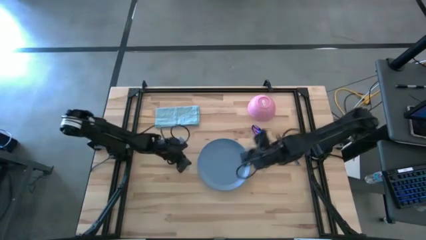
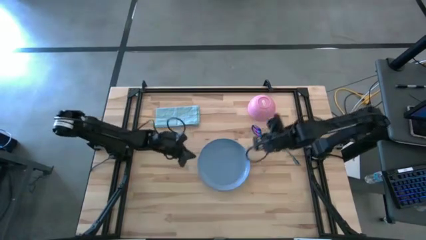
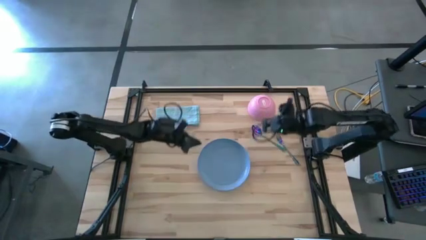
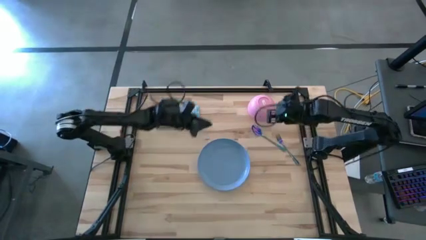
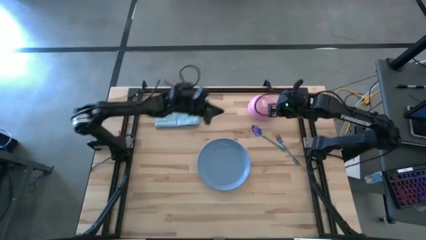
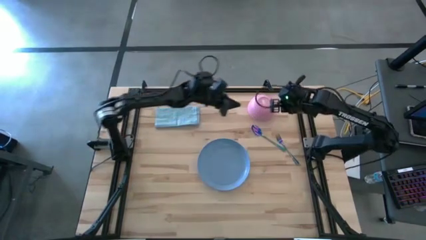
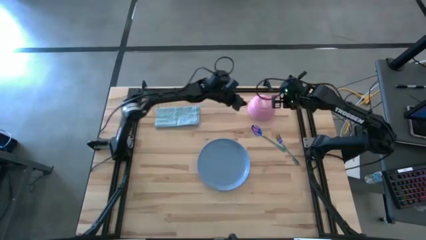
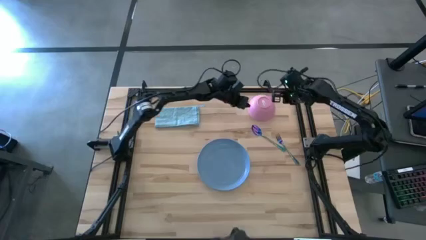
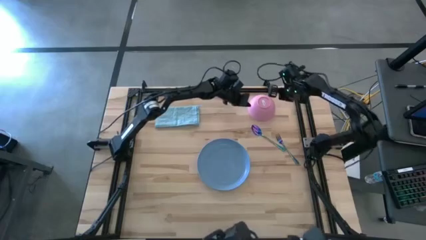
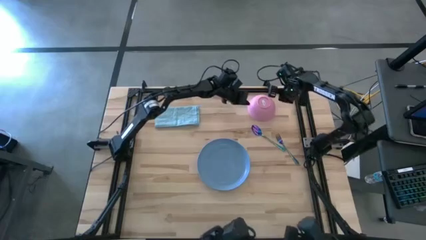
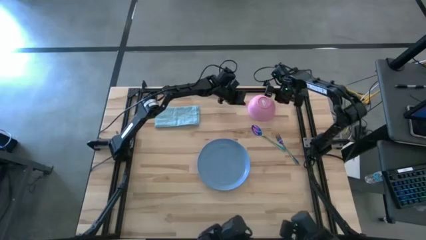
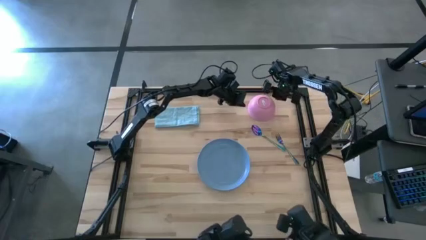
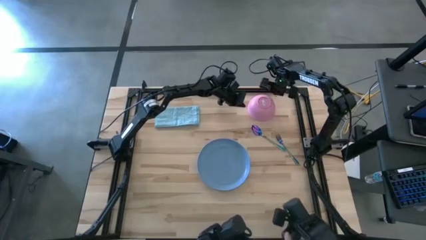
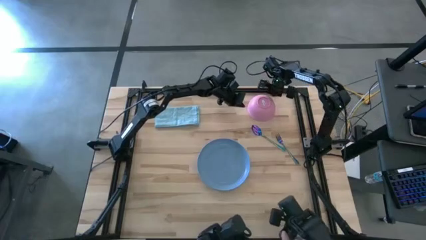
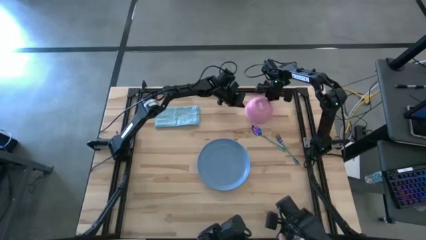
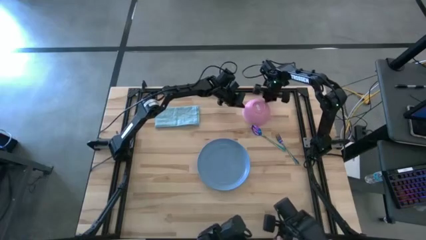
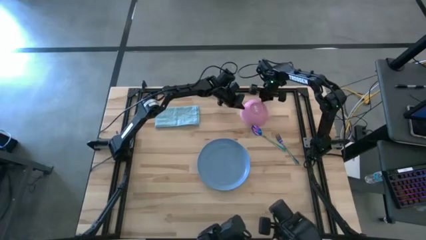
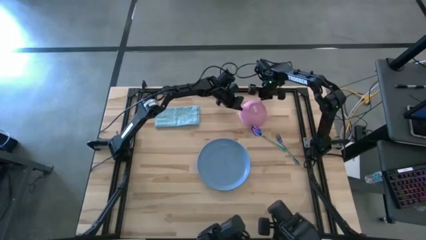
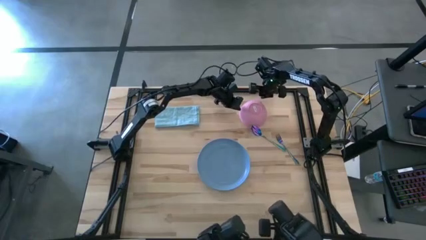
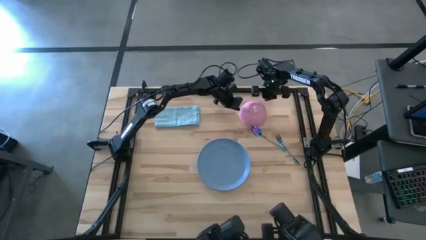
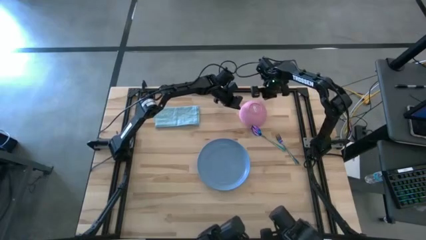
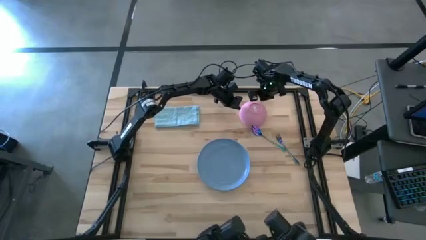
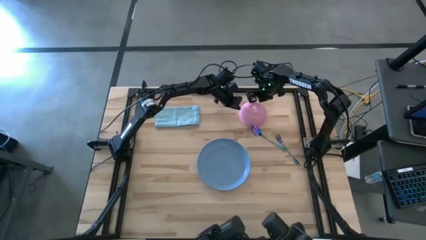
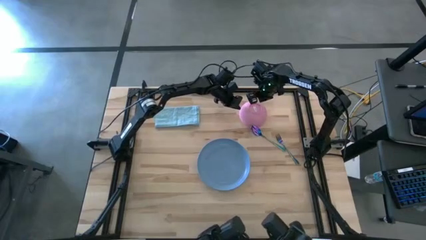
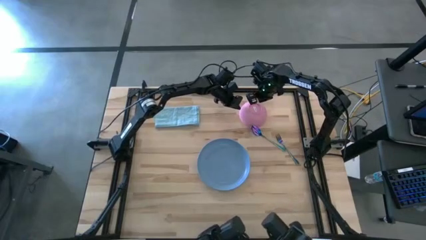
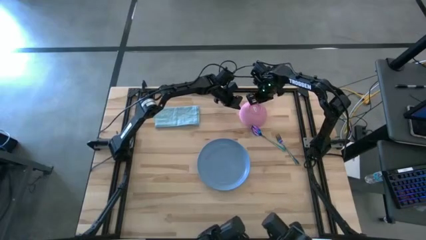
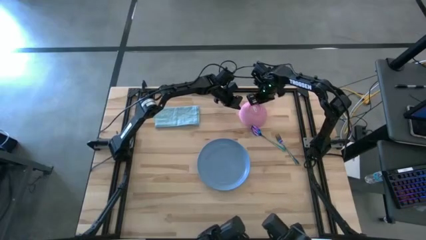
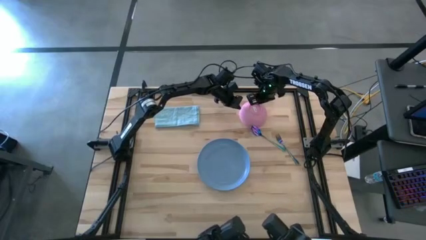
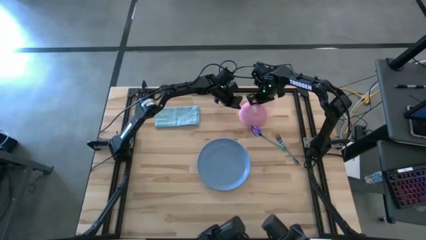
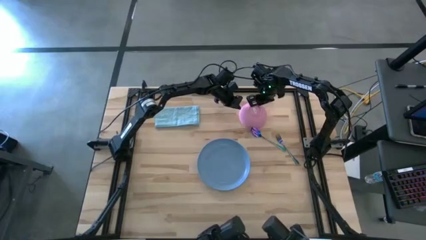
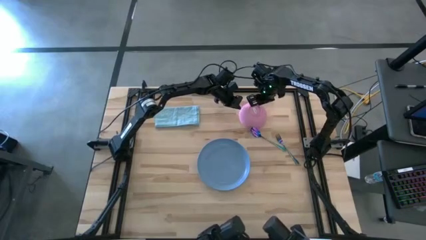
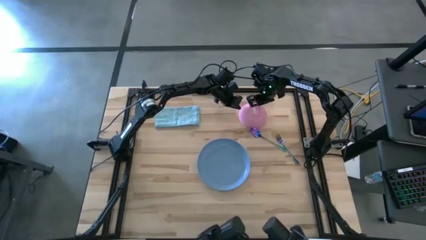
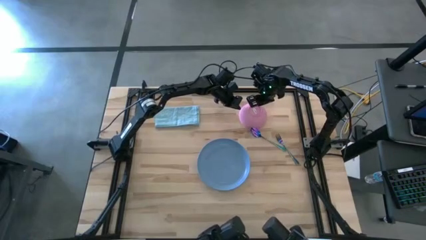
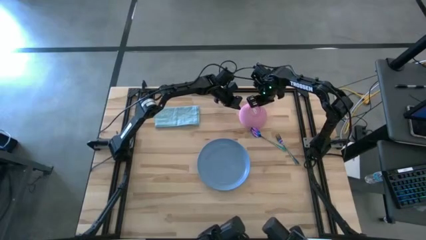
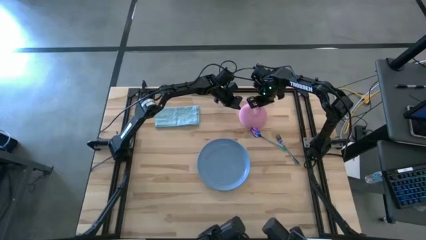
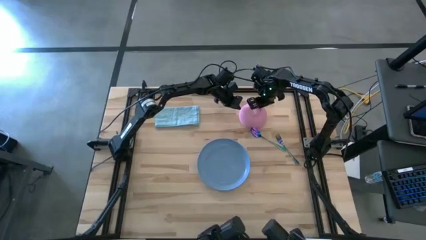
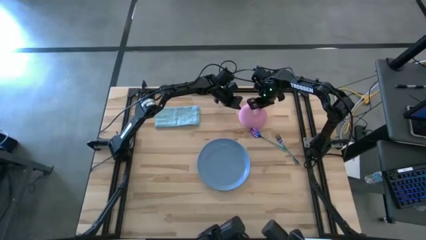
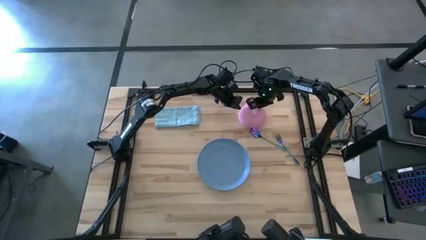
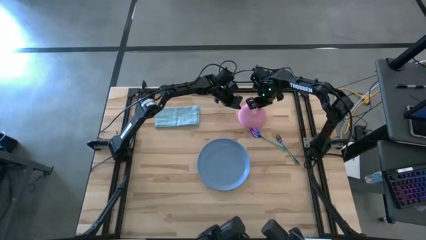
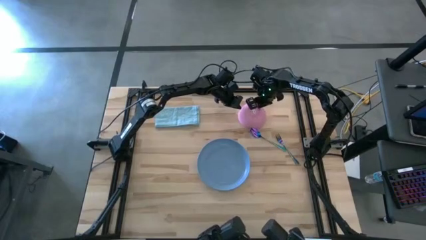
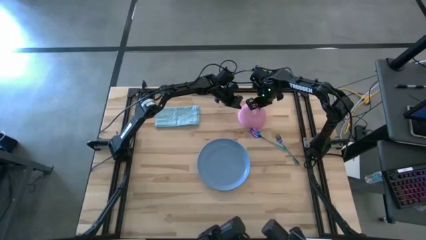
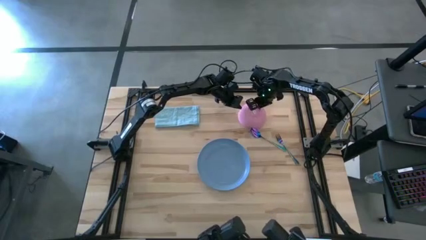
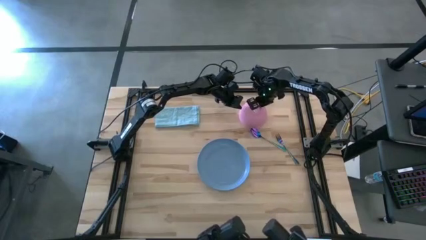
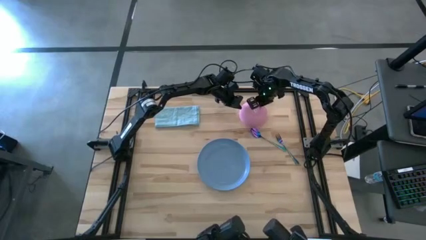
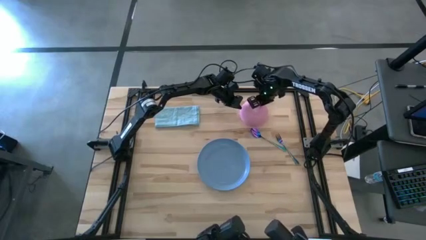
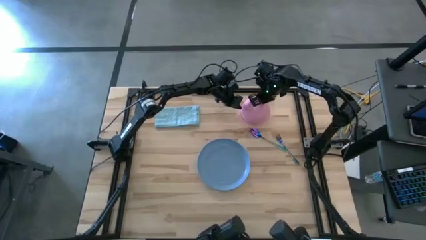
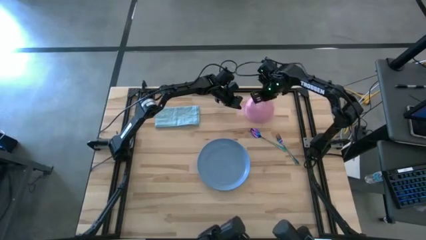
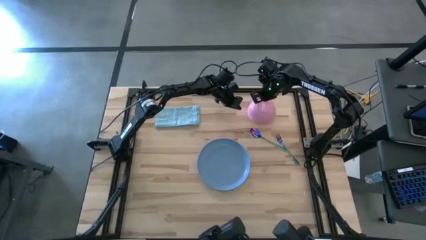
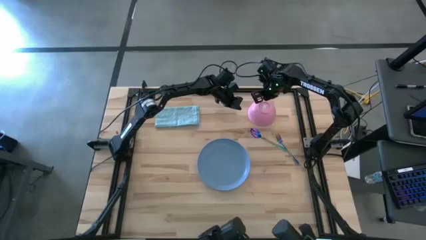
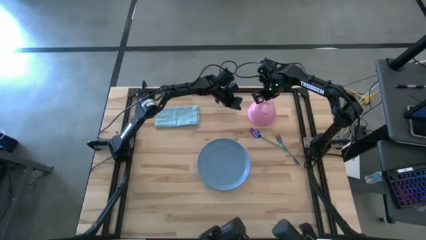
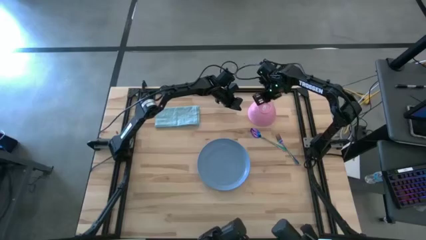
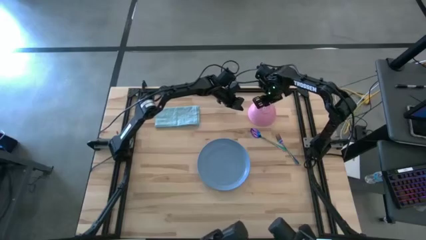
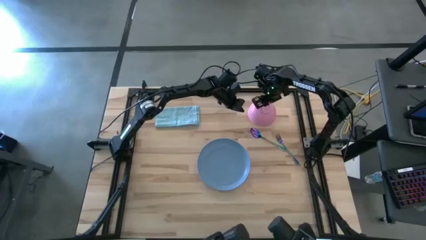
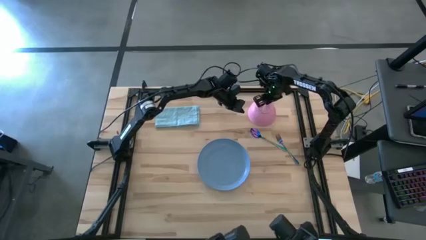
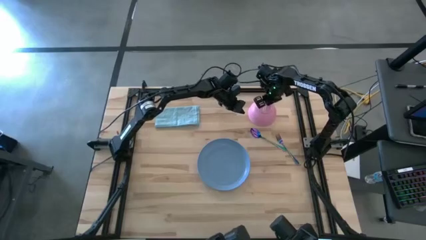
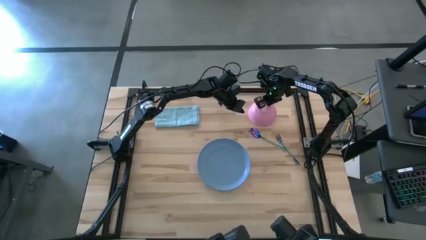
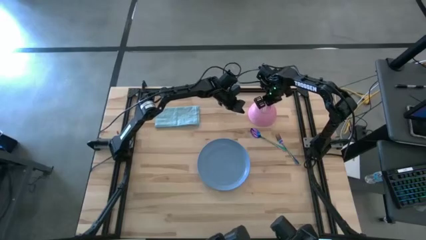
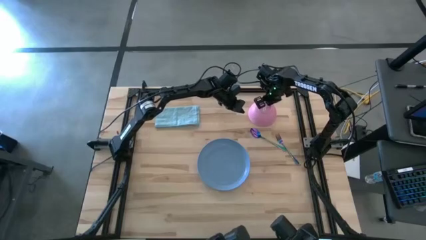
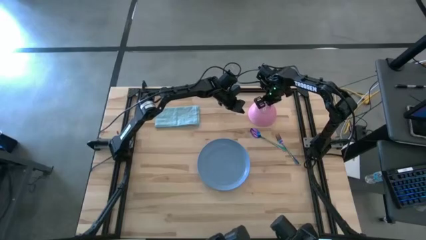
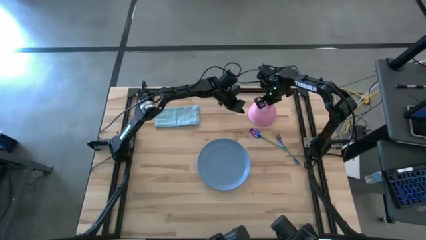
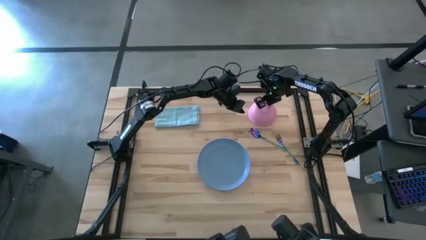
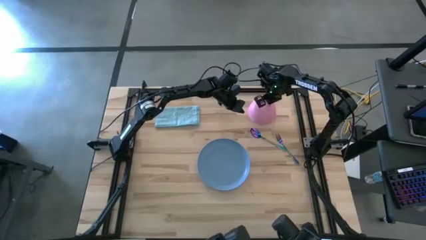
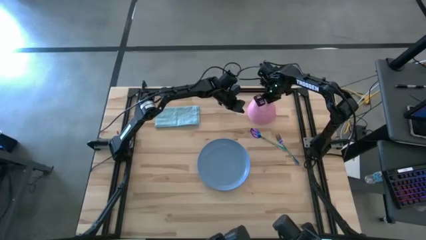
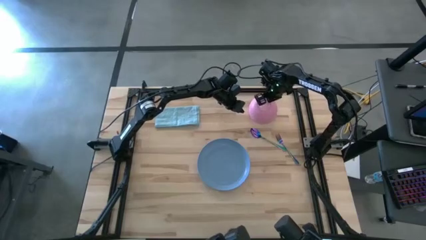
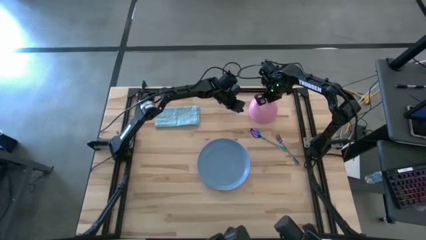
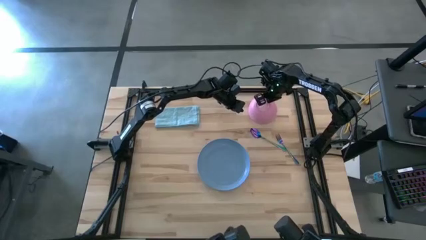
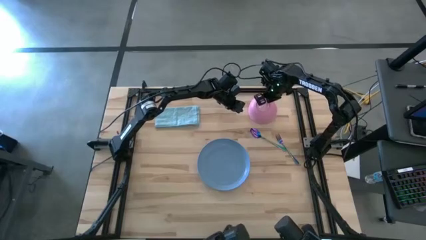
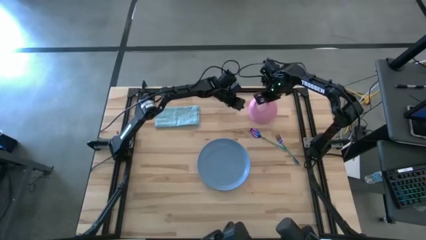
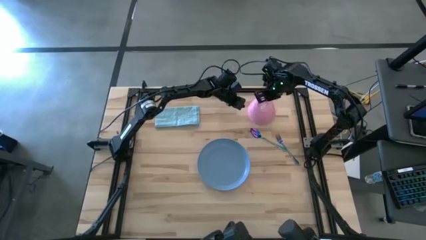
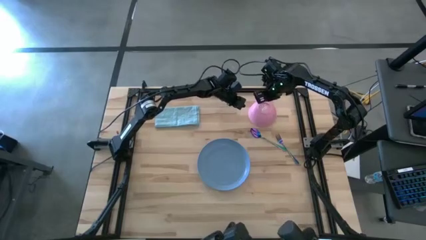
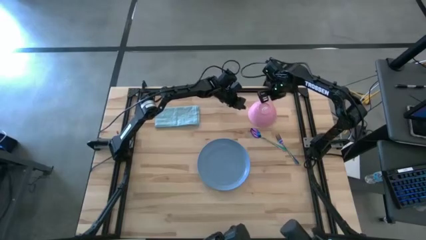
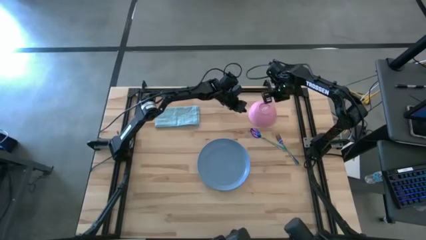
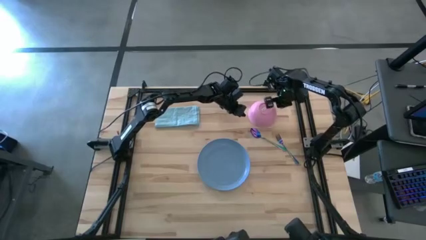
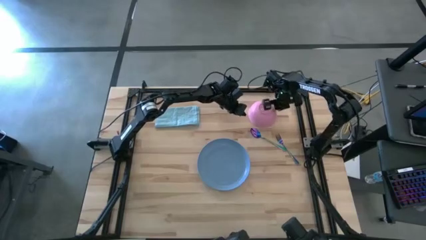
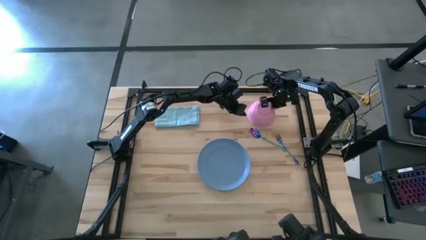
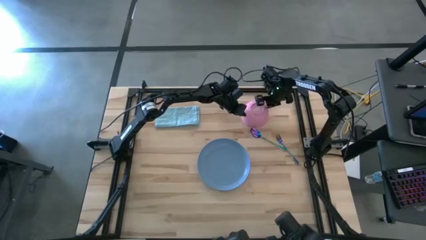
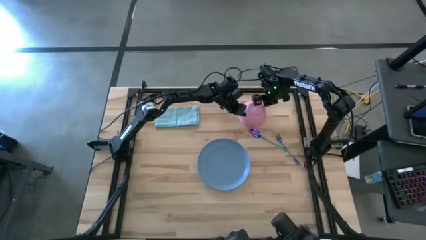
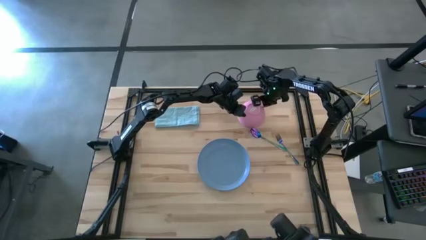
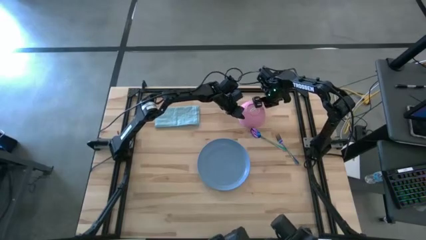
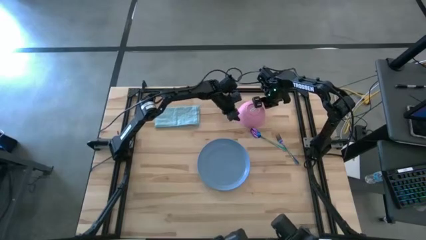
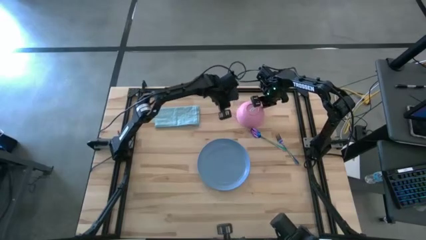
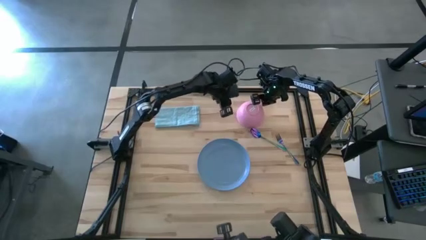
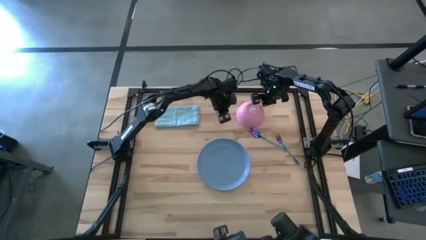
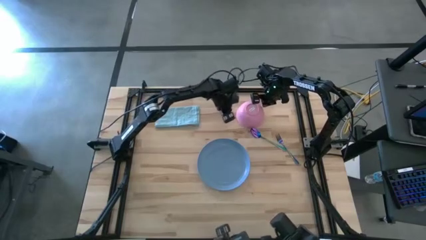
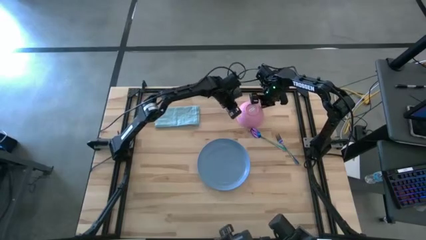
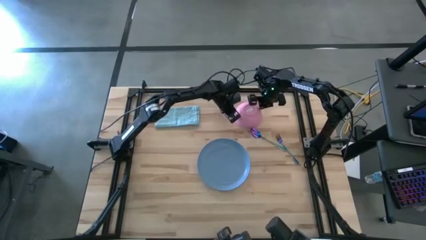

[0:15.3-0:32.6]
Task: Set table place
Put the pink bowl on top the blue plate
